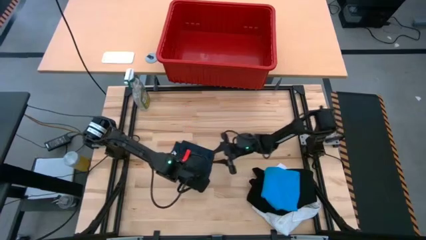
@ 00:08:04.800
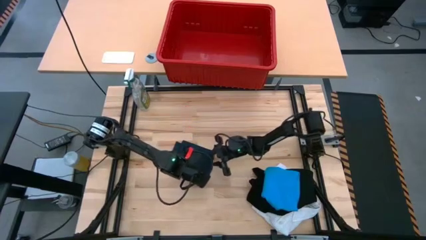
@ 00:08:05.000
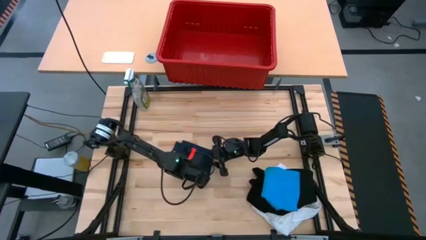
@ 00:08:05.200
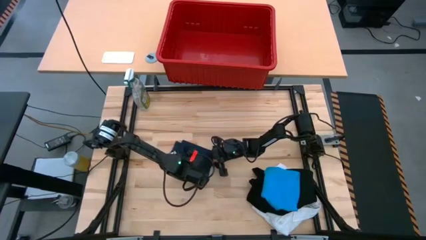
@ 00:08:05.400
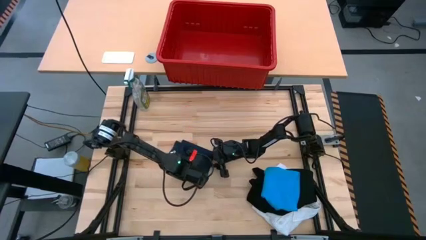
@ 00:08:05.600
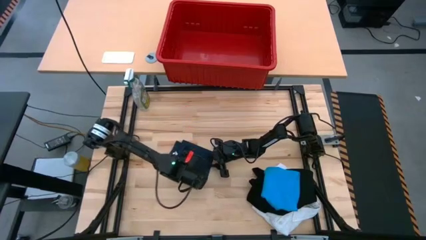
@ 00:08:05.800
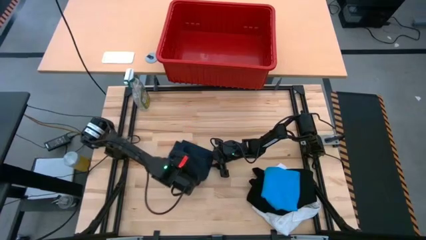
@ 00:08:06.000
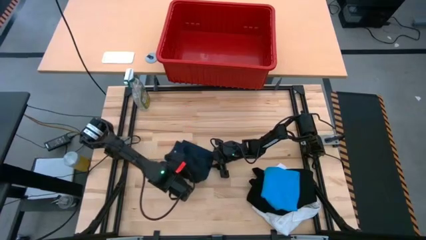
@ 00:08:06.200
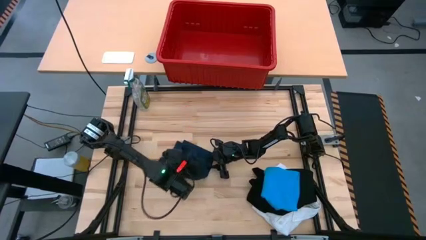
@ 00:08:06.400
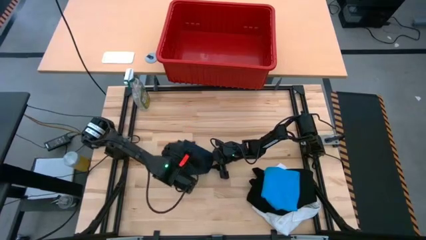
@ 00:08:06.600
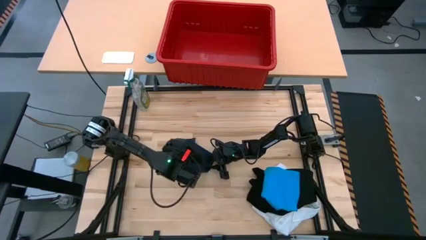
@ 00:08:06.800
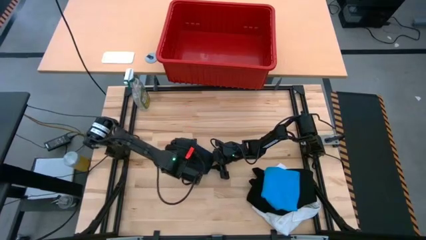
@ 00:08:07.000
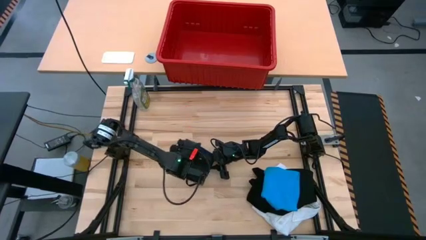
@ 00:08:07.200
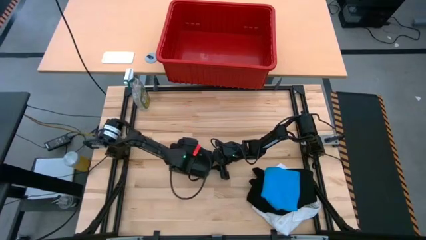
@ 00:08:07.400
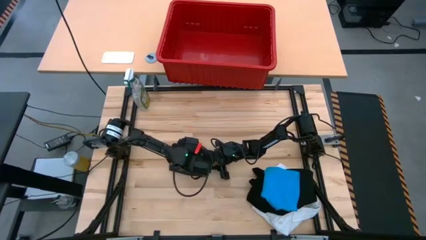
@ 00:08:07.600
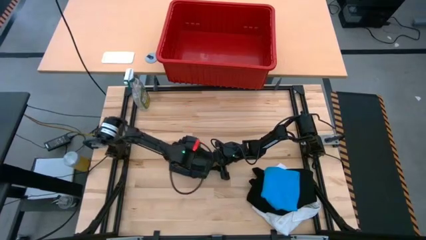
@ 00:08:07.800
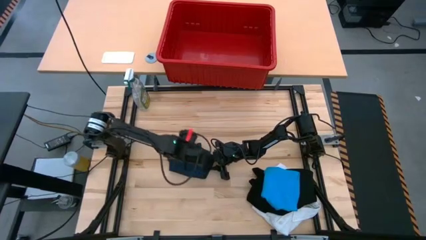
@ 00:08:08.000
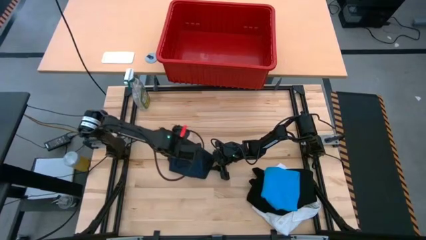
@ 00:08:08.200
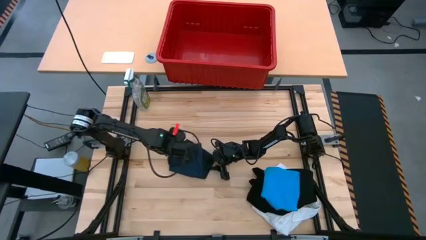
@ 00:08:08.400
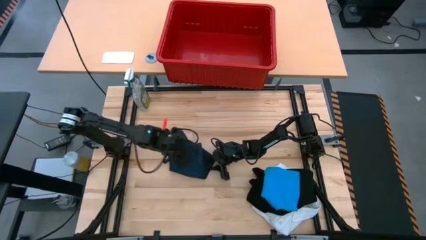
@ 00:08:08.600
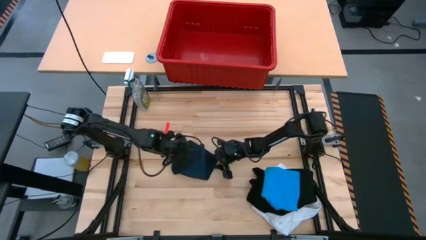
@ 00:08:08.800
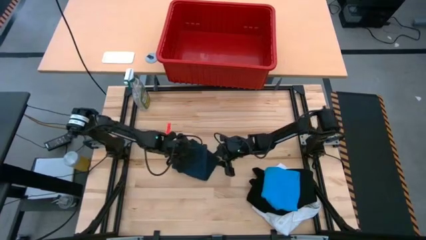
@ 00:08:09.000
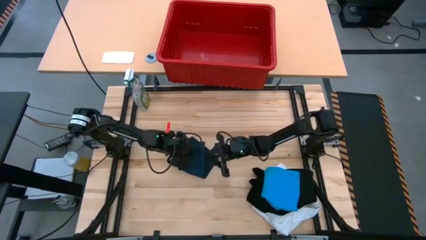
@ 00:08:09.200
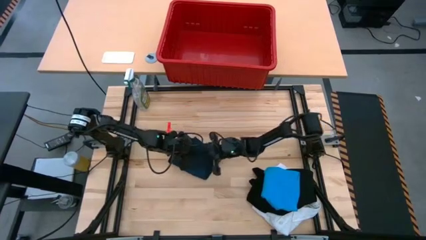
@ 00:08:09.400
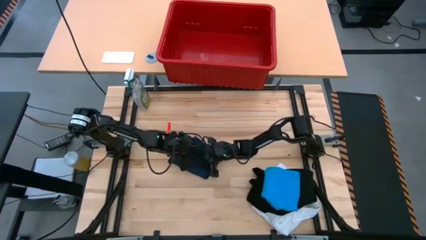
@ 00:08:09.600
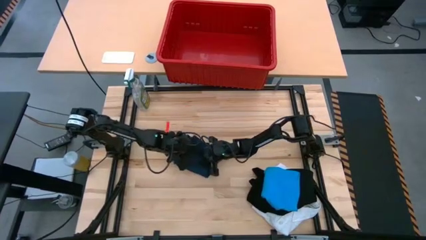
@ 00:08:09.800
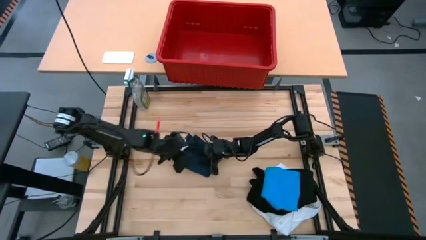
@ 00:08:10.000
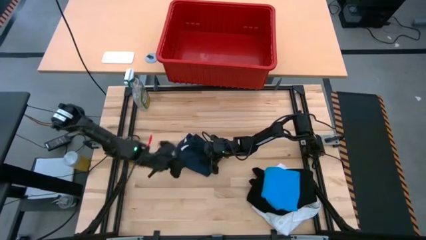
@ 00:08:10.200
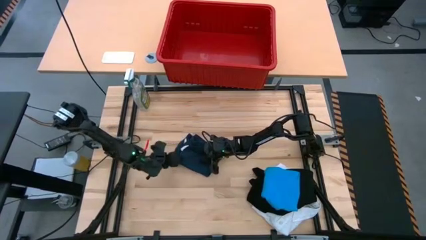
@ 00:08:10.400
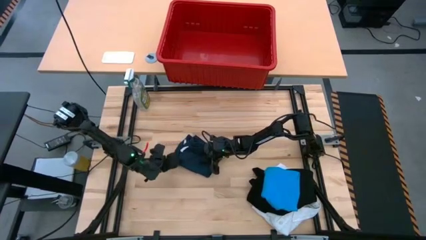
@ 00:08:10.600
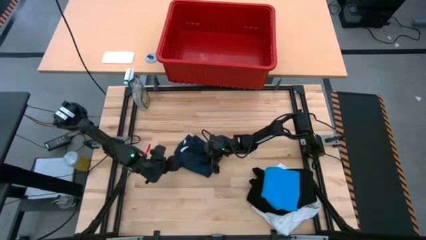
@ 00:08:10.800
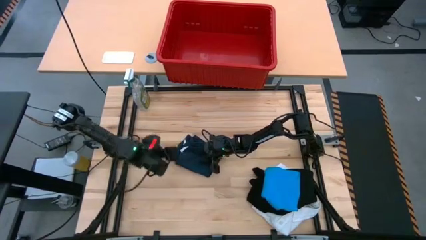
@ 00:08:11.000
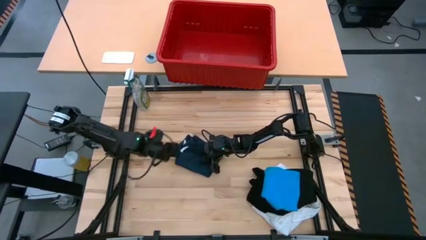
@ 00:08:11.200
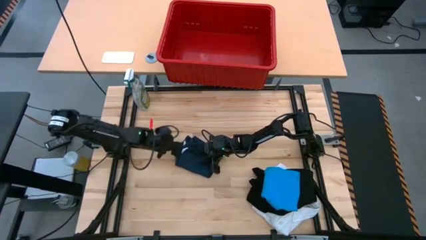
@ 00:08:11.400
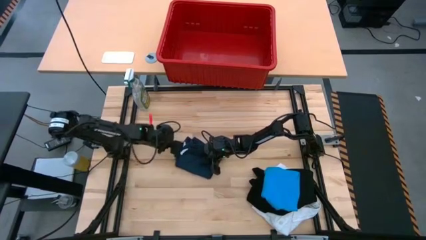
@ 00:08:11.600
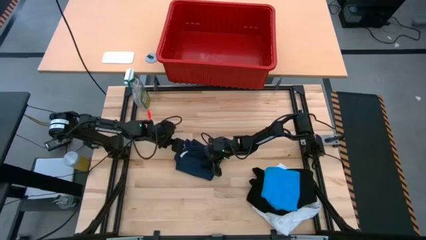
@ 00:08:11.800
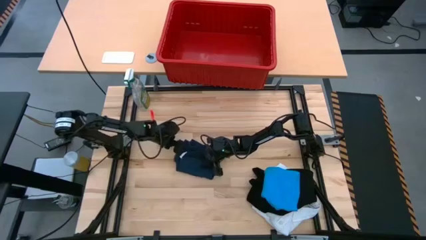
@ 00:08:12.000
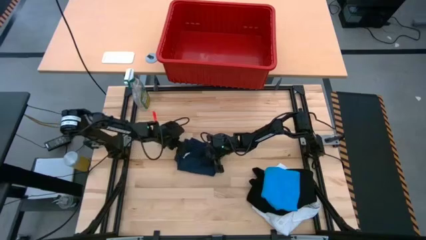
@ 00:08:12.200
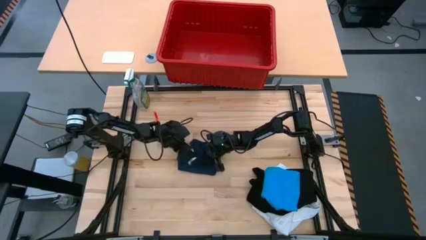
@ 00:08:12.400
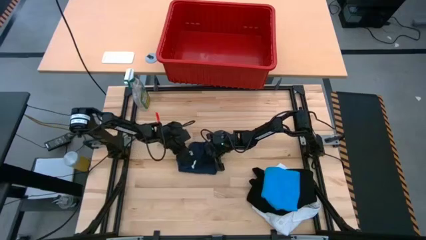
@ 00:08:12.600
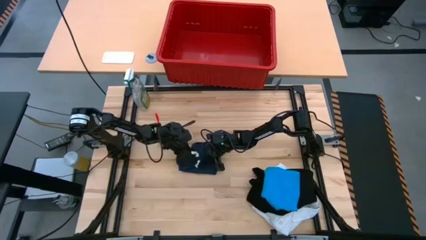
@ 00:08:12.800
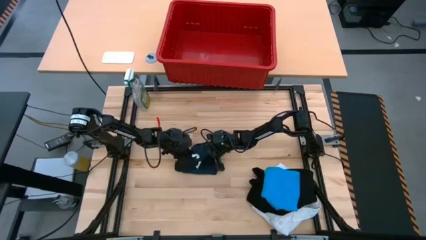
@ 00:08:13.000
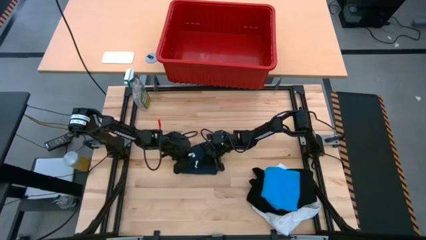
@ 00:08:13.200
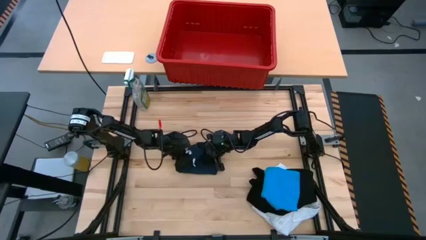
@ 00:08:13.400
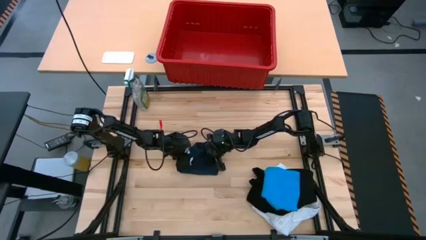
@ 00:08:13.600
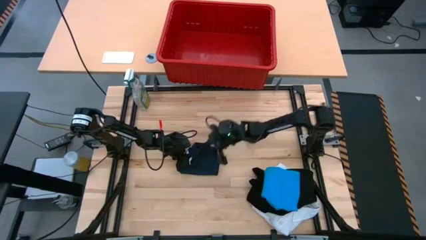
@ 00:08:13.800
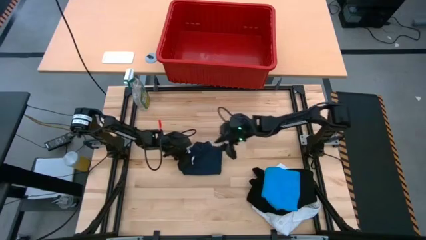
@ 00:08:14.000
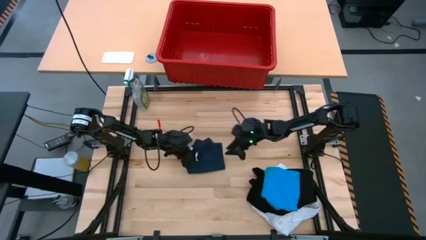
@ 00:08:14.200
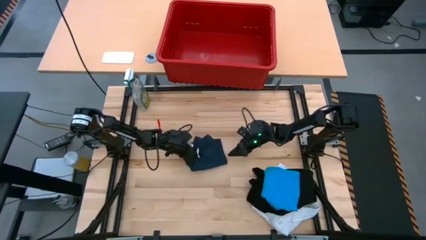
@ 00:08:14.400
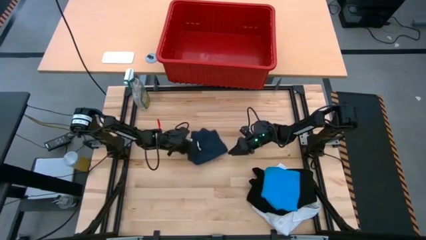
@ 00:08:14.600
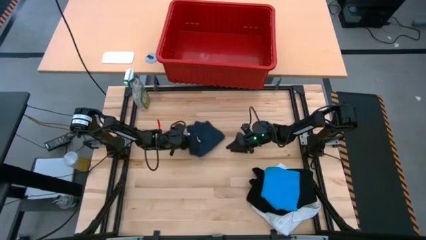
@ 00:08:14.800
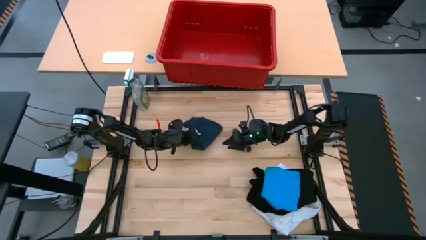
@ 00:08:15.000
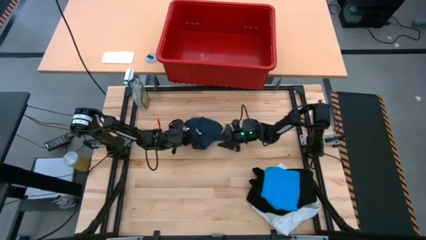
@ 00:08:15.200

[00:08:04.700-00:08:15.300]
Task: Fold laundry
Stack the folded dark blue shorts on top of the folded blue shorts

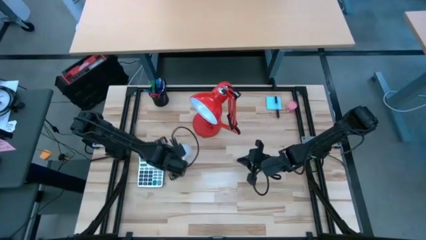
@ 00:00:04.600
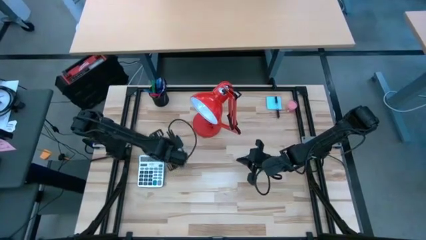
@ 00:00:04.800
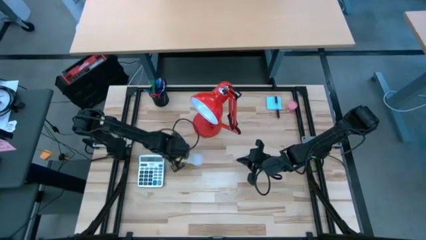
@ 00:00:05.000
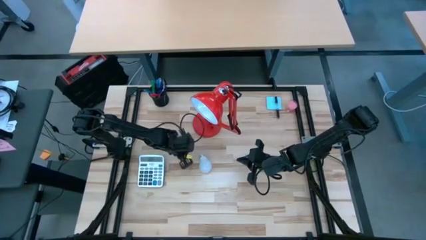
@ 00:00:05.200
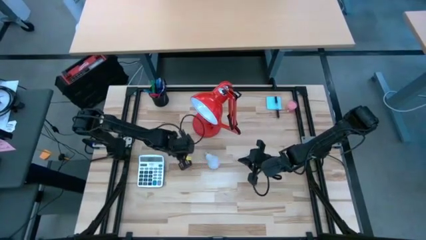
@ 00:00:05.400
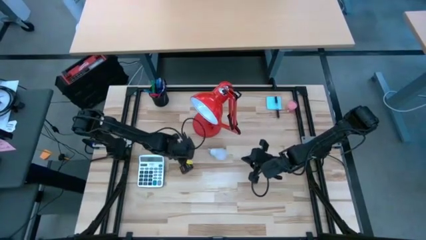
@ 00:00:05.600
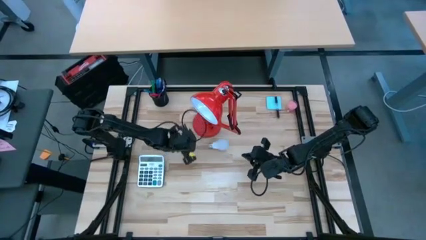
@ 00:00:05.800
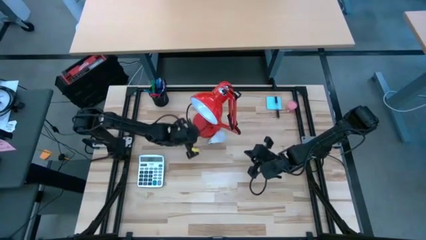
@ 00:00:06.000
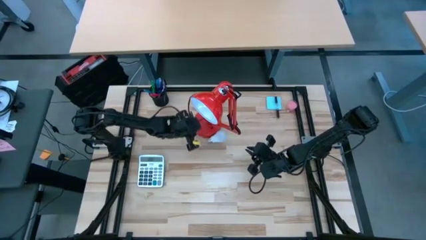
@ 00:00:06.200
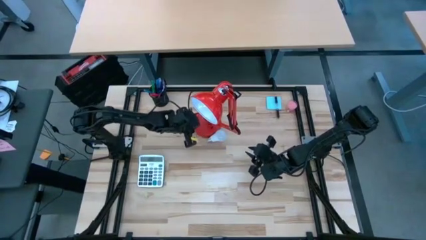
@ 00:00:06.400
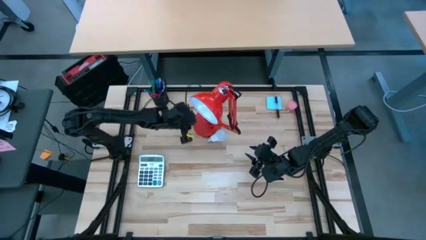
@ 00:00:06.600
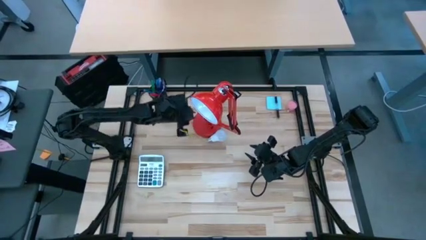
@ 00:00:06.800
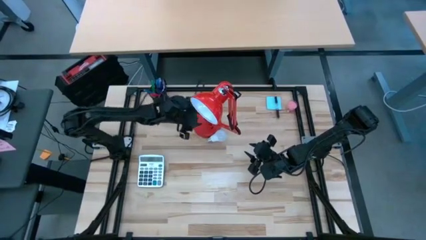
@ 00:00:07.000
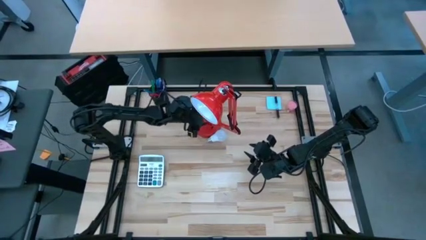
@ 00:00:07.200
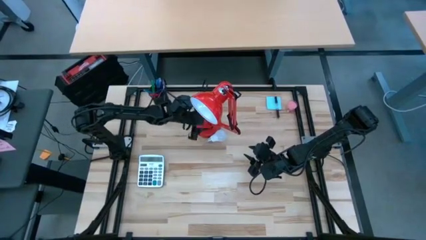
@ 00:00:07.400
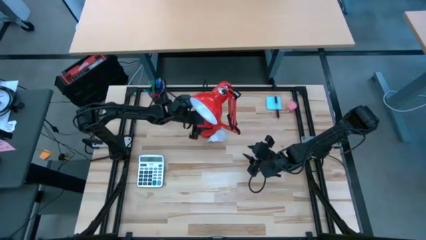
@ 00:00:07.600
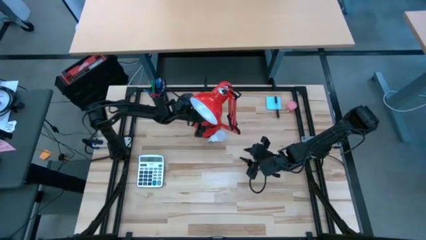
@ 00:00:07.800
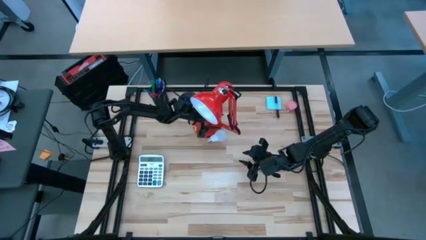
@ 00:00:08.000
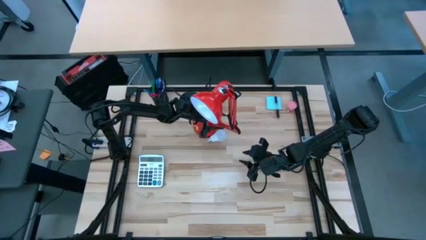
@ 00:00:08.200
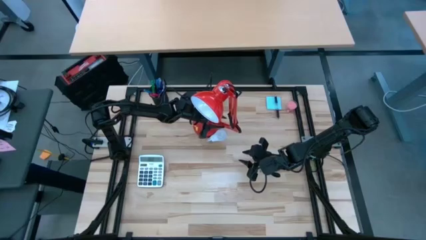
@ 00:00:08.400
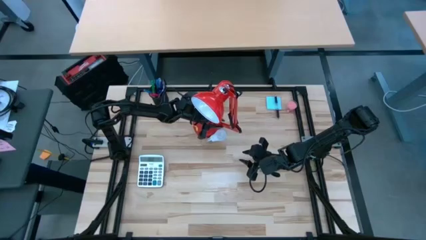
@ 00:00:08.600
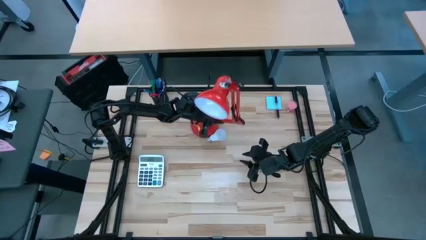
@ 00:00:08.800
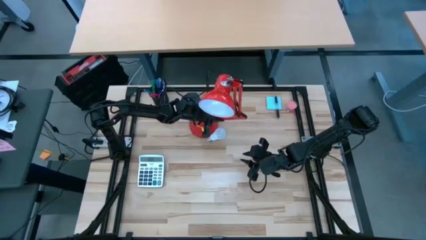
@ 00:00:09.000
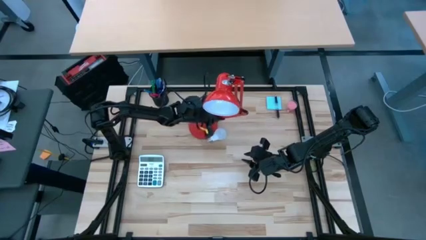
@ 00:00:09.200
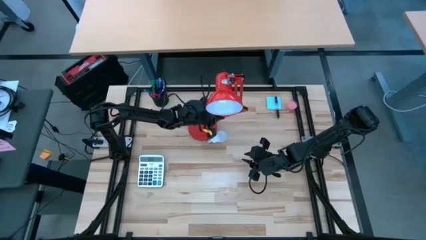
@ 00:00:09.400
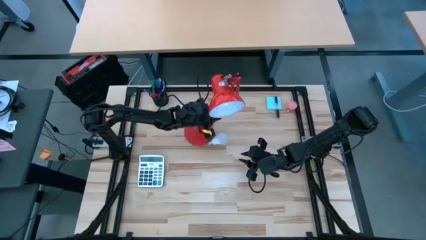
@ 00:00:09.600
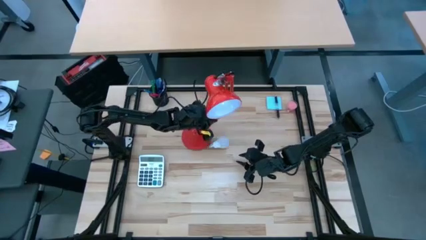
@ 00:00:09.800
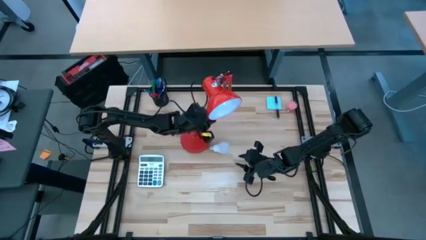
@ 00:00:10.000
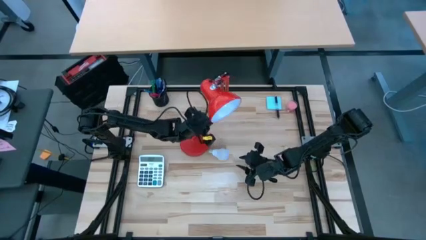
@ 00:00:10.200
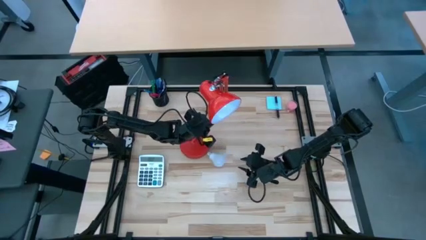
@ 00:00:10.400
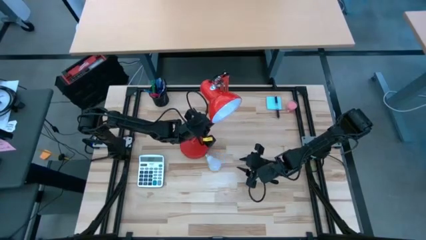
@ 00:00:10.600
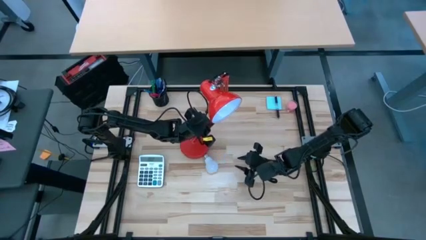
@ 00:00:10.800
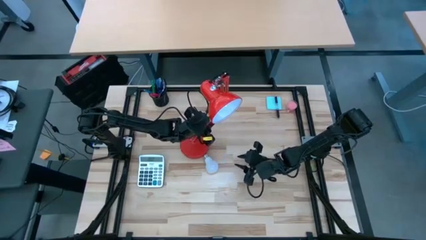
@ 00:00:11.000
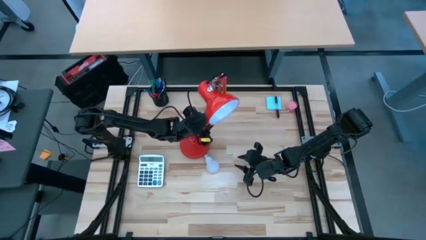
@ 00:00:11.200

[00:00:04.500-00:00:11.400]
Task: Screw lightbulb
Prepare the red desk lamp
